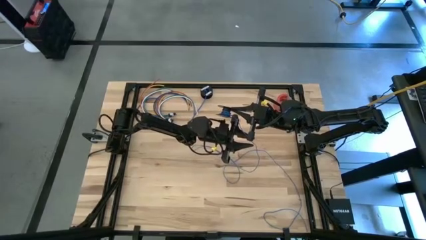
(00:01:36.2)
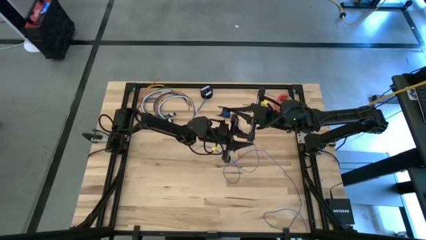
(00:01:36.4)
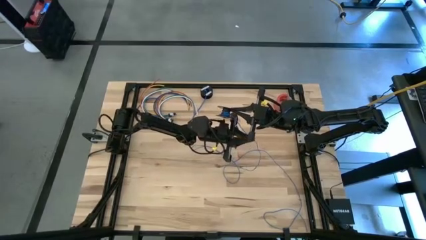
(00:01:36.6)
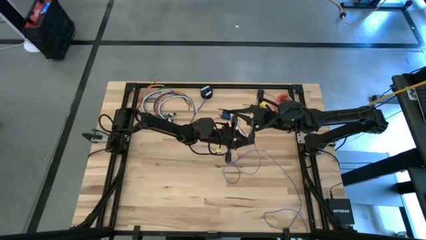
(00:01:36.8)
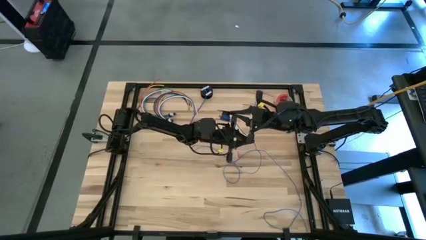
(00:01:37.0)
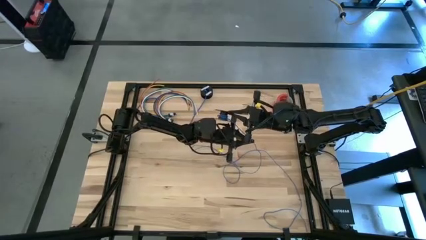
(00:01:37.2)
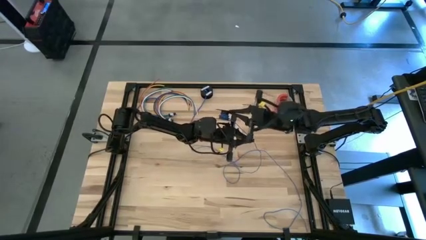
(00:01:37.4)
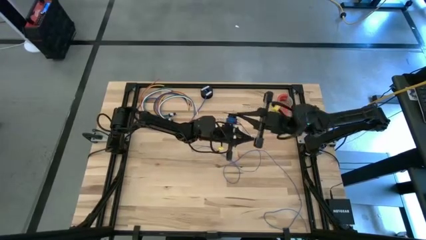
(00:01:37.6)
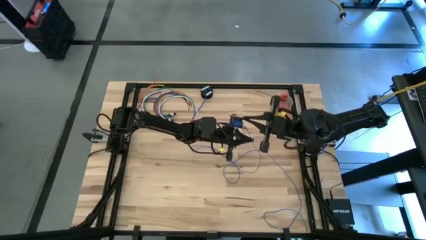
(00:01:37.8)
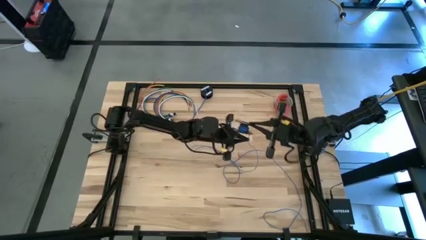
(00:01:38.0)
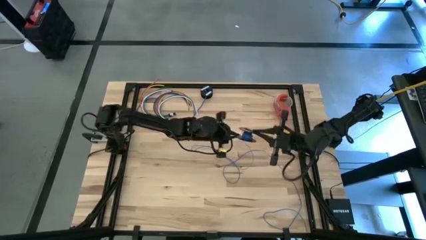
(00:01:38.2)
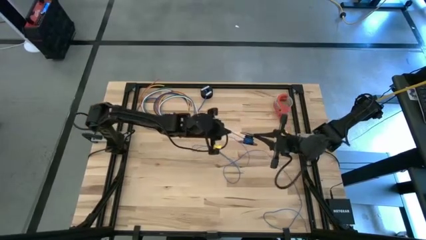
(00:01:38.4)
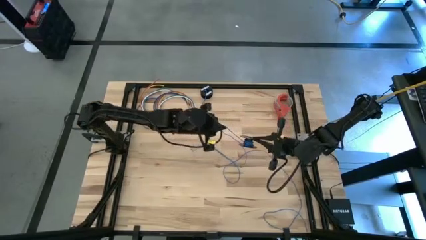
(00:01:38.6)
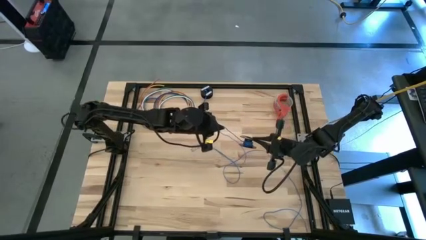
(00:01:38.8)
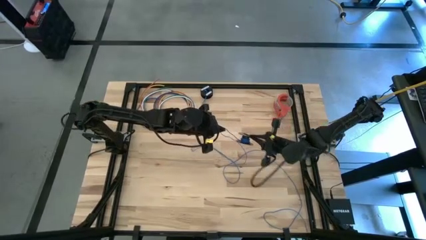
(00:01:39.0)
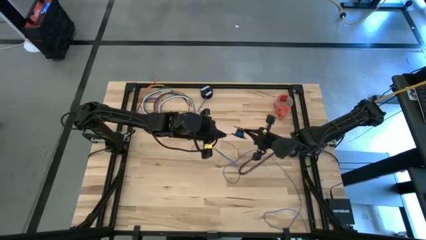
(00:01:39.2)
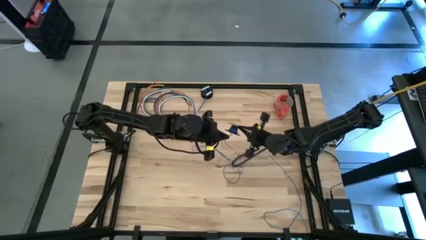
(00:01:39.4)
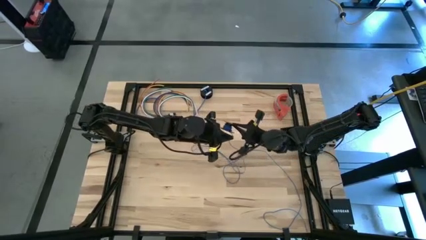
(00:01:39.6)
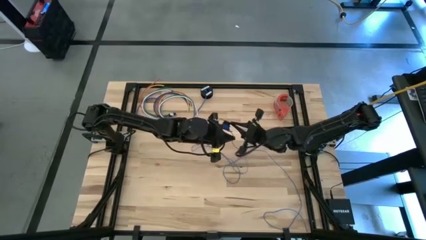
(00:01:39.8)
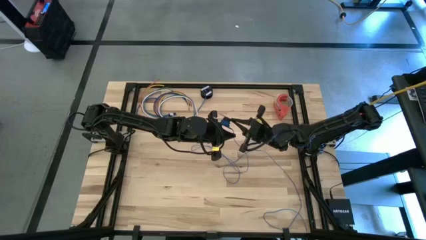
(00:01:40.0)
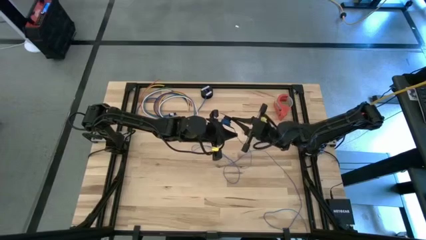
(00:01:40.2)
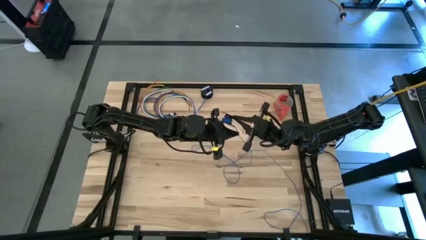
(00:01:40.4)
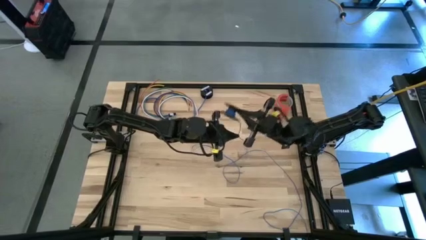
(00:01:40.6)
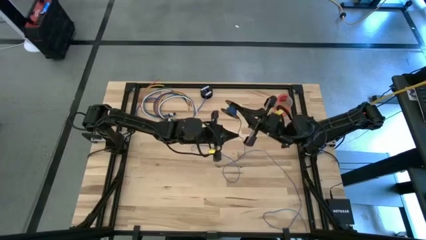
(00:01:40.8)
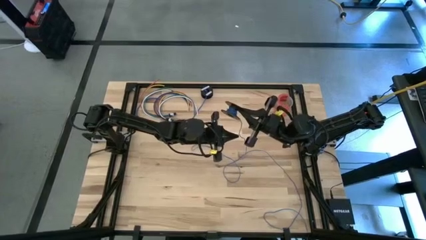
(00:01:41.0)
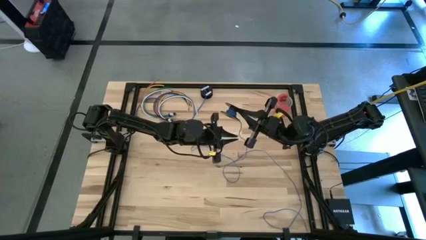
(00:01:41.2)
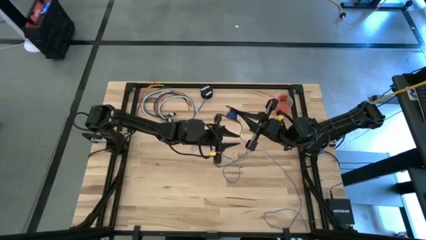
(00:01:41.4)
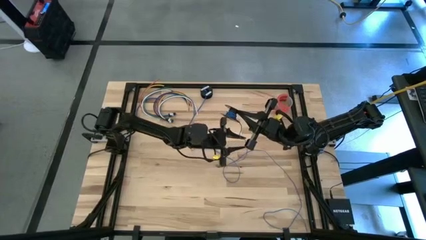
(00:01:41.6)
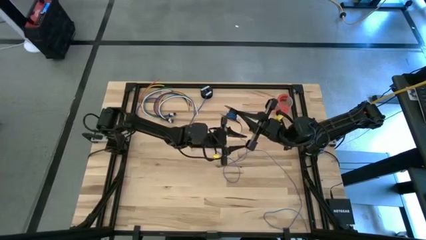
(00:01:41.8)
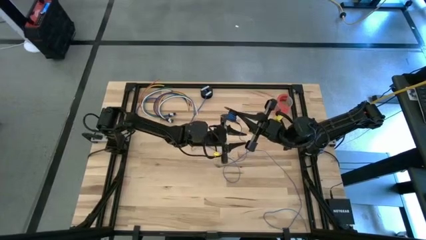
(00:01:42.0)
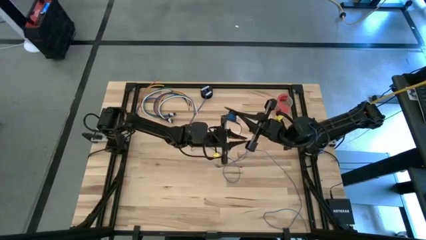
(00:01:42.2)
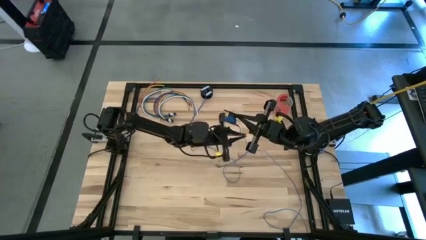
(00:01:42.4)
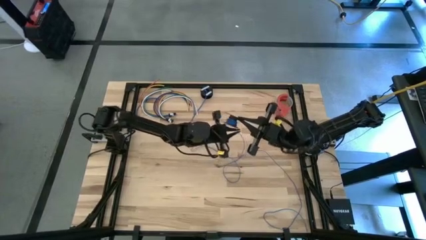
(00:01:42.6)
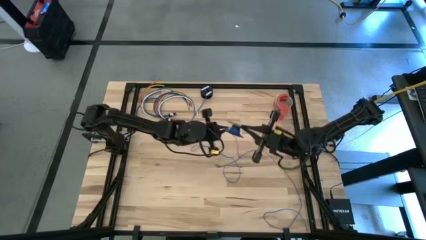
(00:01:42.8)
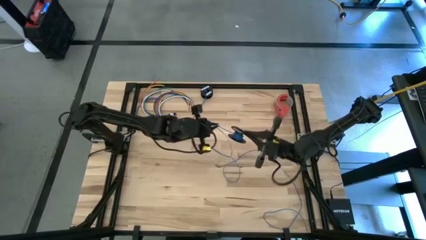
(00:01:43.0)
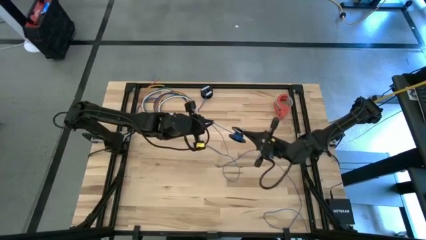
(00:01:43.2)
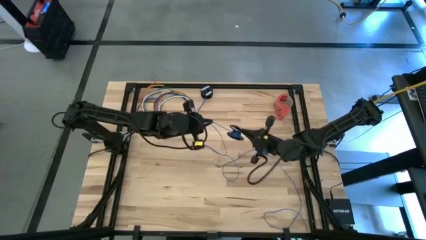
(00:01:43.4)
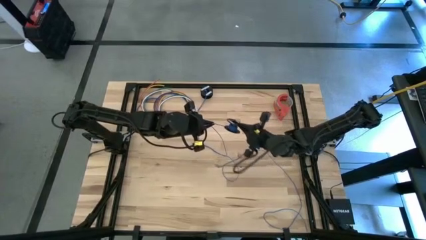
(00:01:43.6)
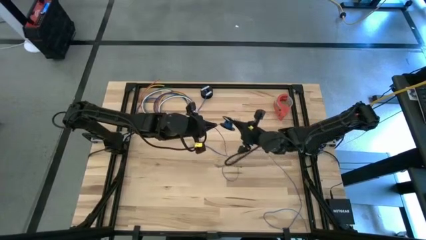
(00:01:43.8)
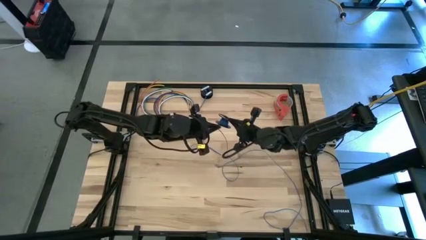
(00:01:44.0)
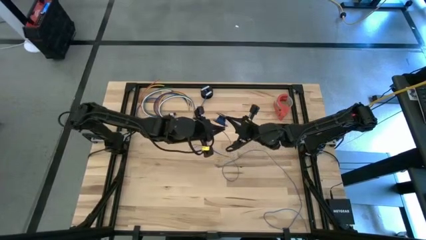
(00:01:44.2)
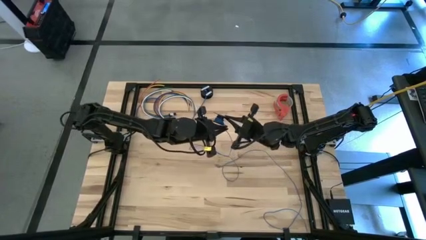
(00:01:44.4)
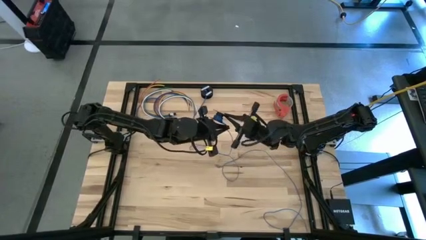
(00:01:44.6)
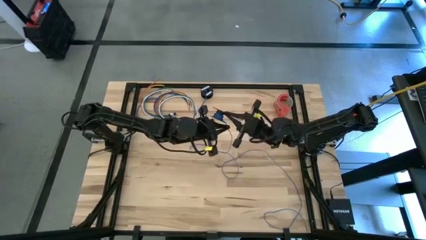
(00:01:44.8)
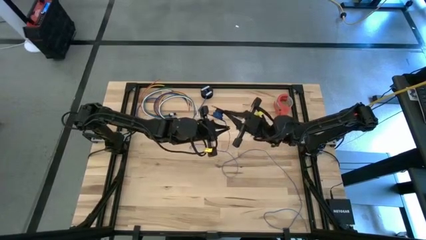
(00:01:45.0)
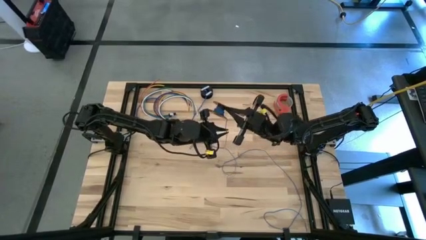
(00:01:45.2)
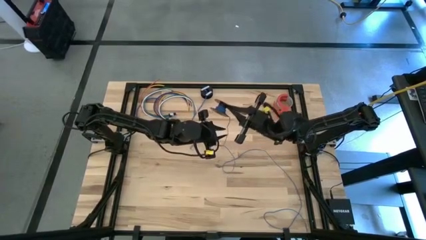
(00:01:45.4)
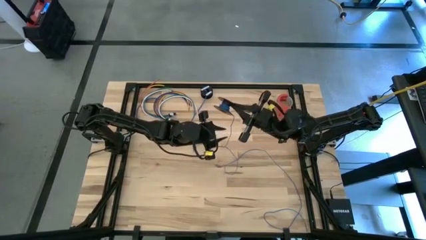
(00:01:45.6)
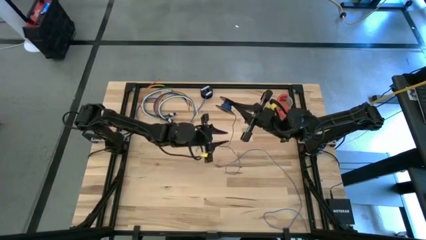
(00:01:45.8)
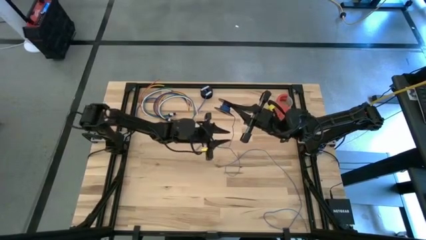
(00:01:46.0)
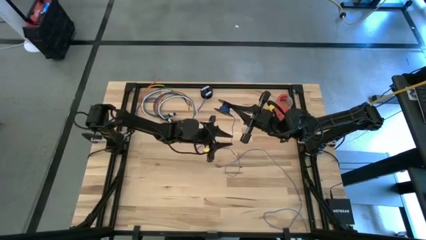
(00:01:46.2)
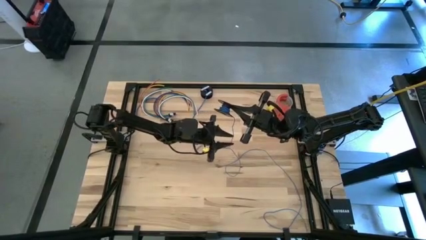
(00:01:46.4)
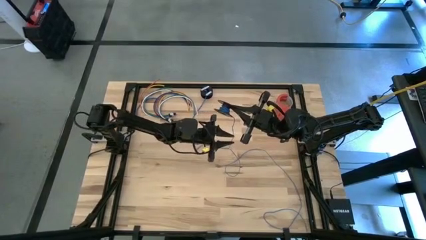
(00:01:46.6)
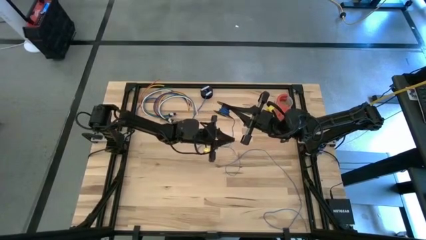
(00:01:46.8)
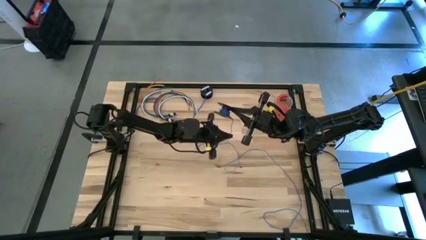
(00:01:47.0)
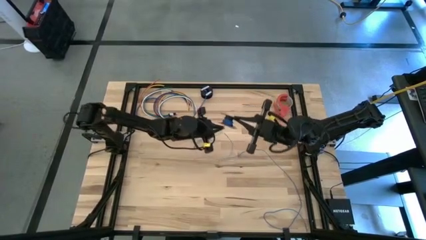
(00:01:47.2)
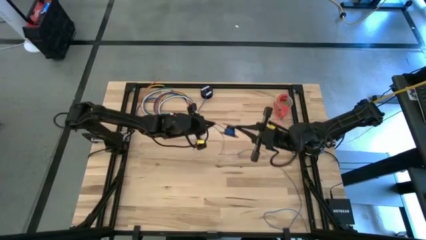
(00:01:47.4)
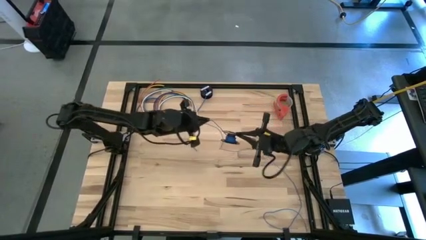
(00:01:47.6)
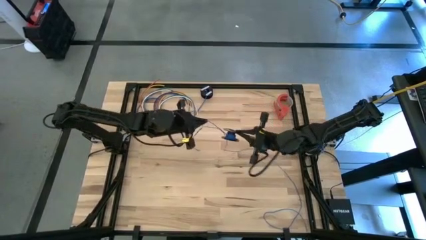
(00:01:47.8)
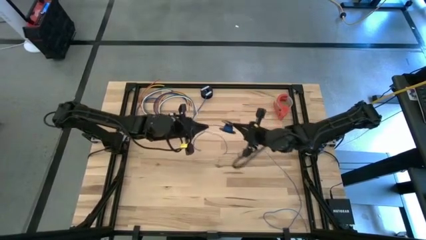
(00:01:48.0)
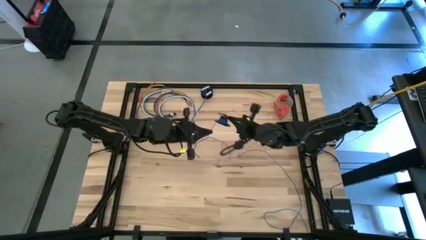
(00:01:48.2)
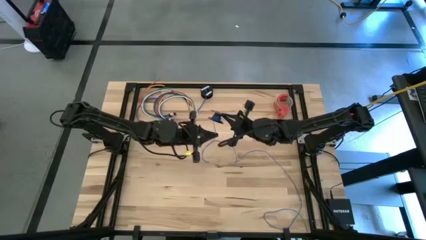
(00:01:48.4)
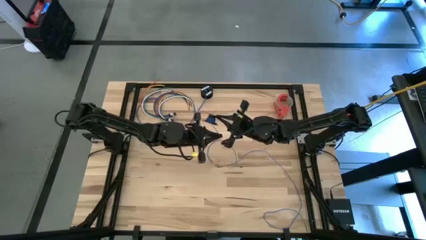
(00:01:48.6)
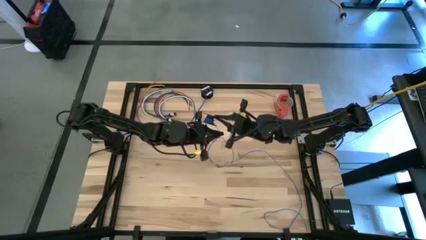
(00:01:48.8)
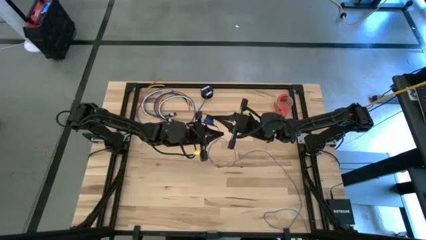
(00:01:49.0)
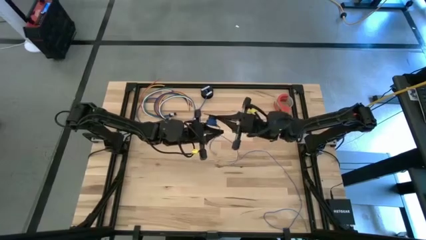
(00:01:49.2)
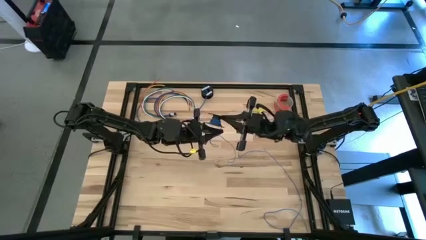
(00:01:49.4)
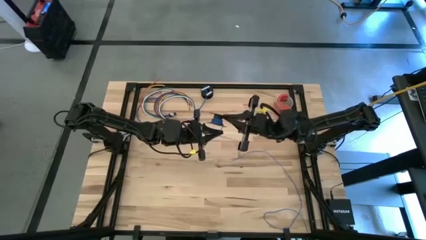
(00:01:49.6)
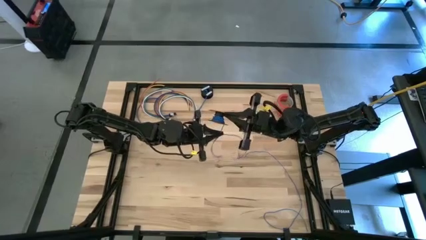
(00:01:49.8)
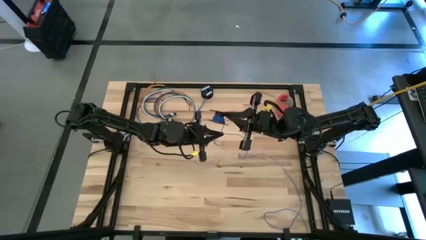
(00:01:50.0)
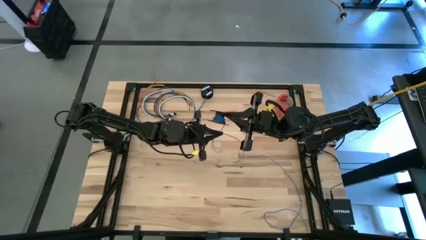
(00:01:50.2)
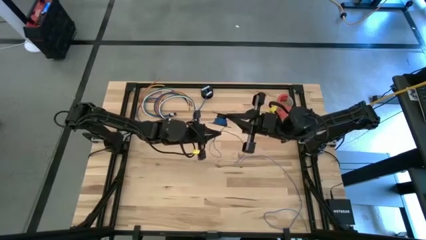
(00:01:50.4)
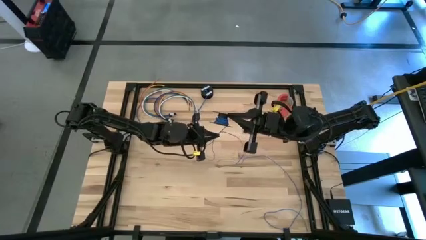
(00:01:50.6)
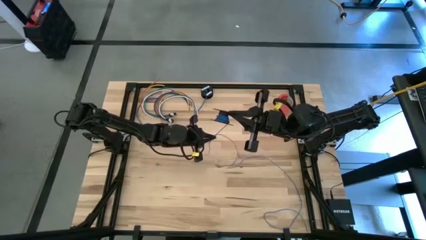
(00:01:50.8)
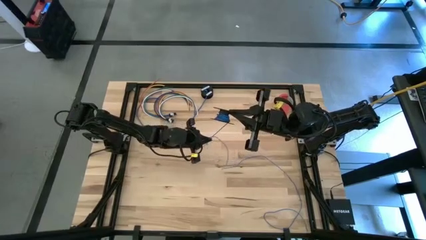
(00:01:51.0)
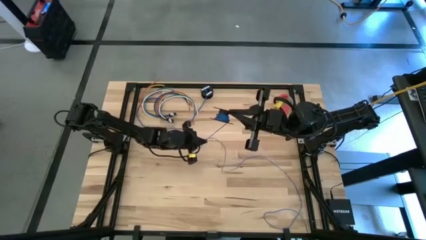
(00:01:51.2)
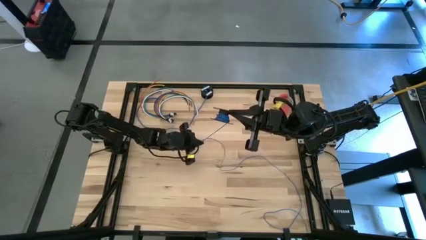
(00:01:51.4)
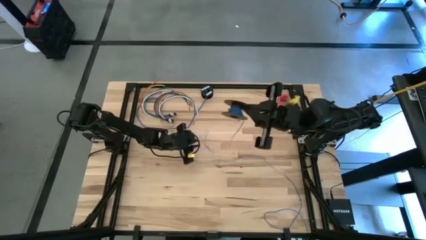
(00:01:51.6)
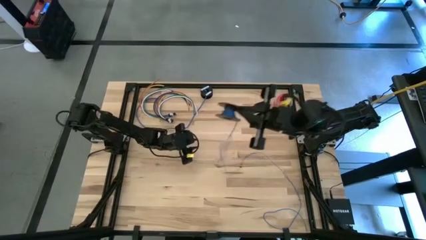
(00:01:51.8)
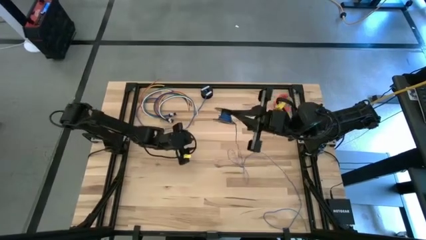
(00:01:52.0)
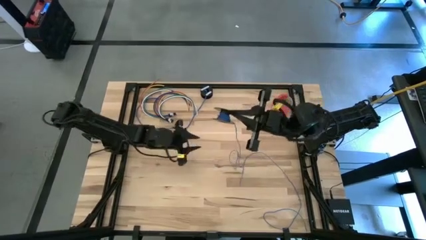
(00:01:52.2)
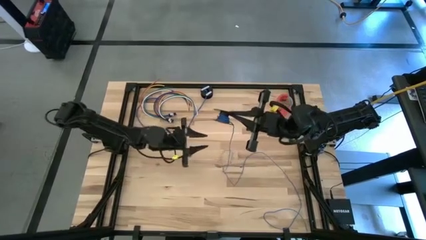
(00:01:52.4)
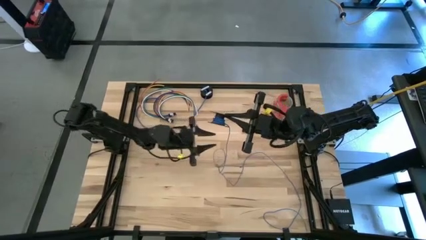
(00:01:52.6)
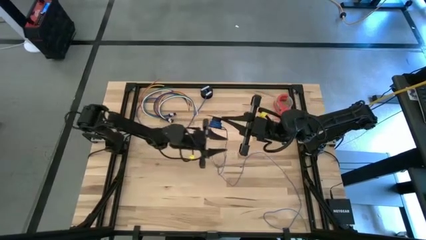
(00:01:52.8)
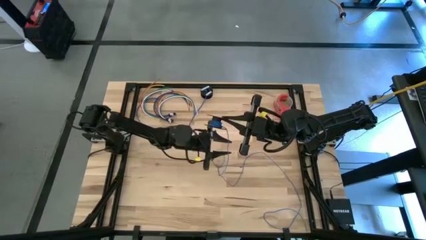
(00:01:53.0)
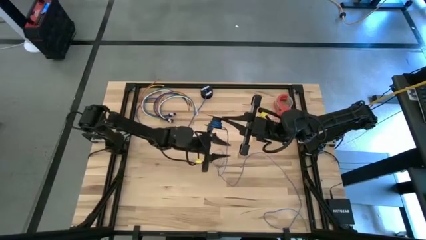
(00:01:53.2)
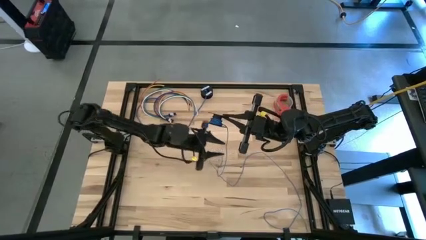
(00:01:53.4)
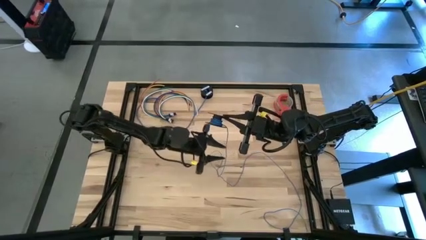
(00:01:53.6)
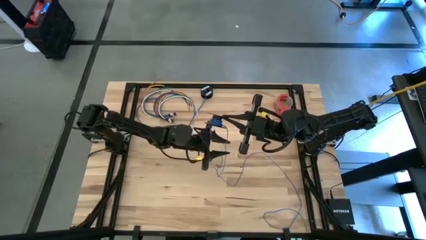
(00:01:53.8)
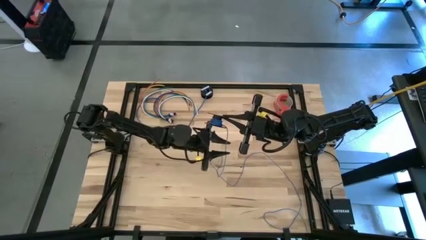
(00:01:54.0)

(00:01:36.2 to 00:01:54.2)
Task: Coil cords
Coil the blue wire onto the black spool
